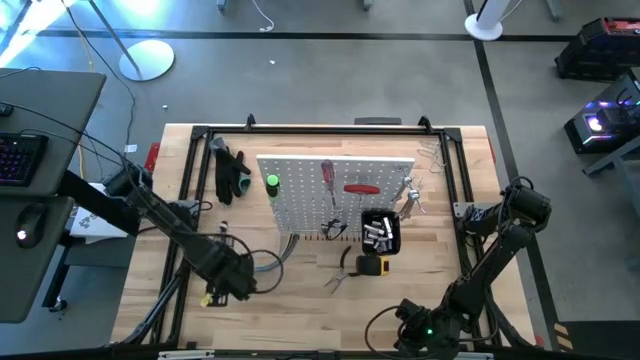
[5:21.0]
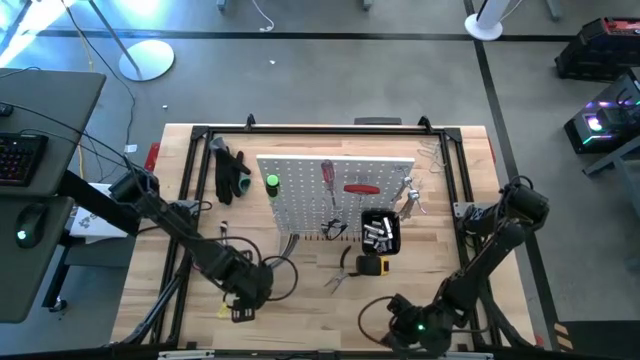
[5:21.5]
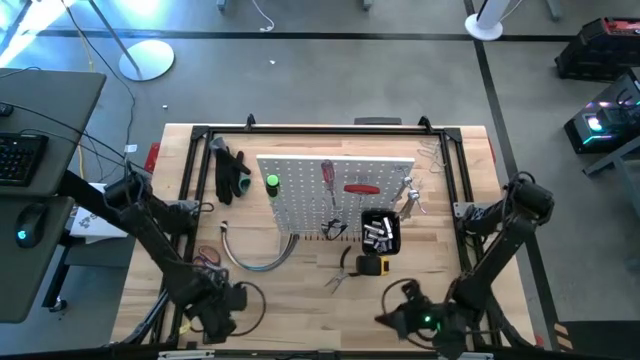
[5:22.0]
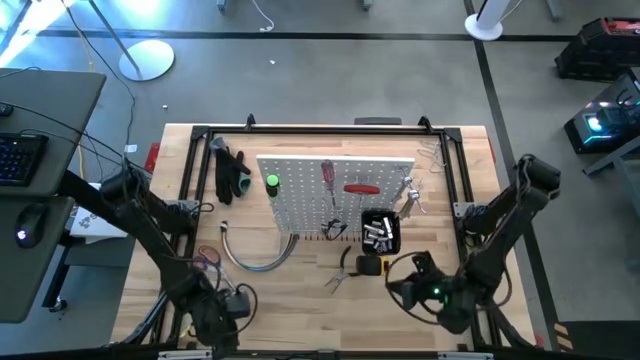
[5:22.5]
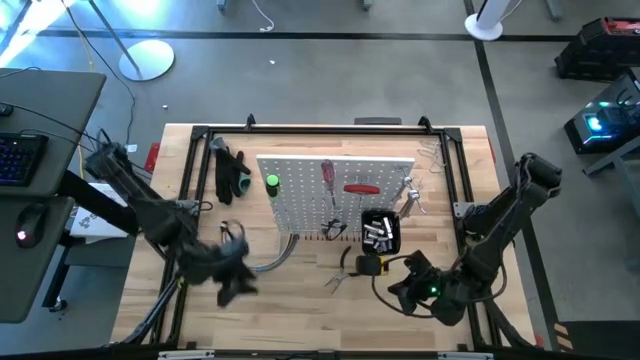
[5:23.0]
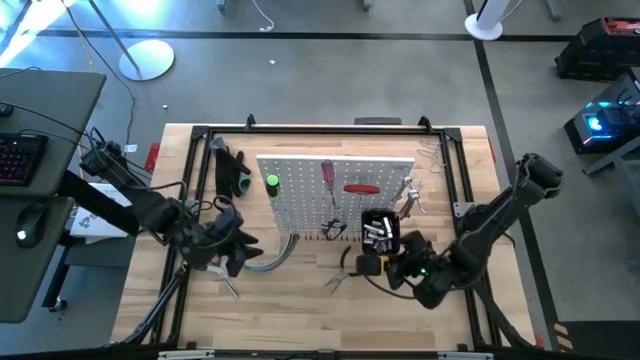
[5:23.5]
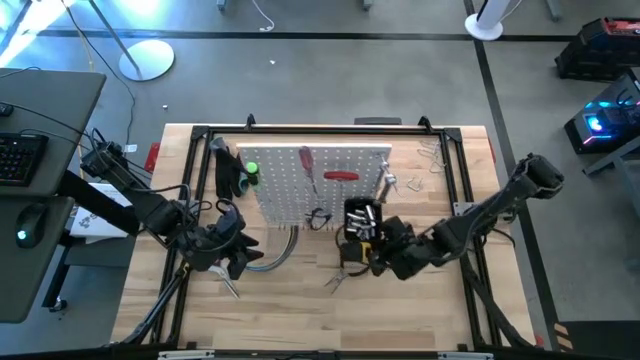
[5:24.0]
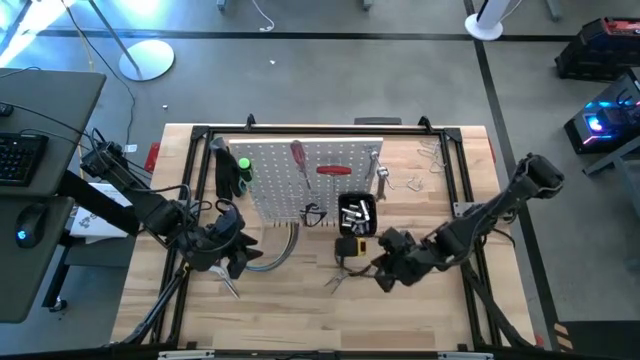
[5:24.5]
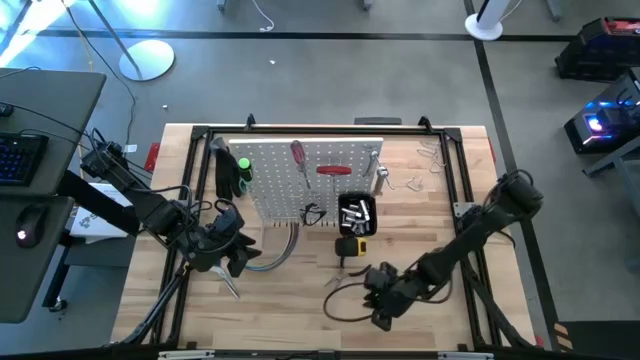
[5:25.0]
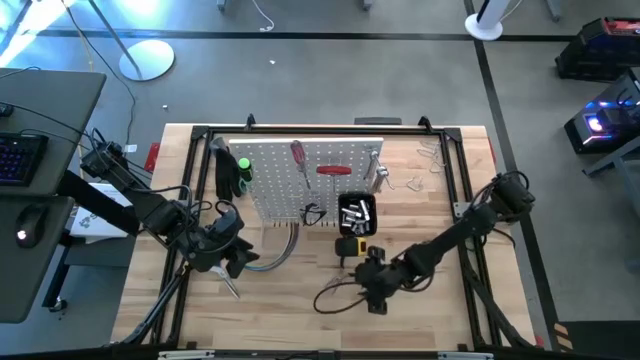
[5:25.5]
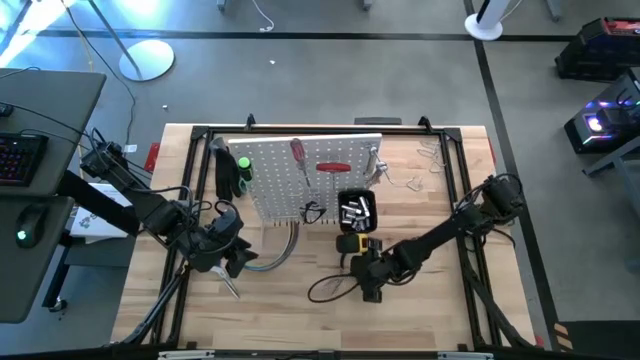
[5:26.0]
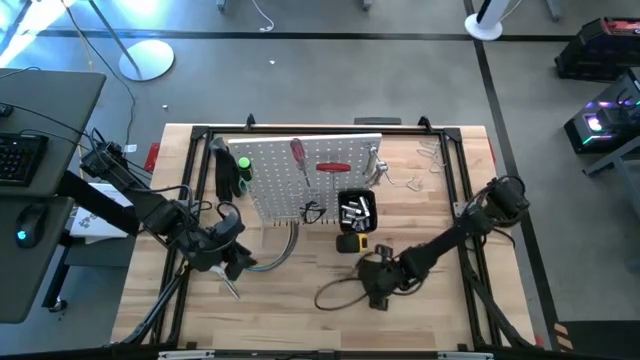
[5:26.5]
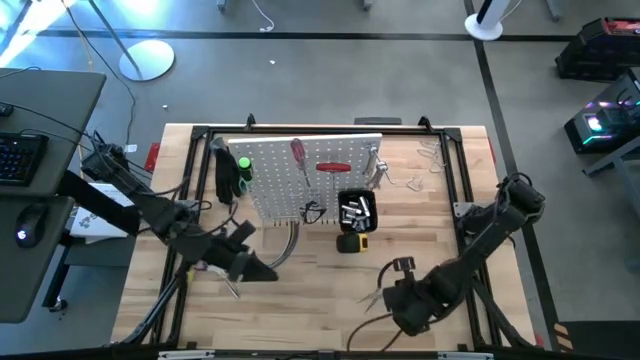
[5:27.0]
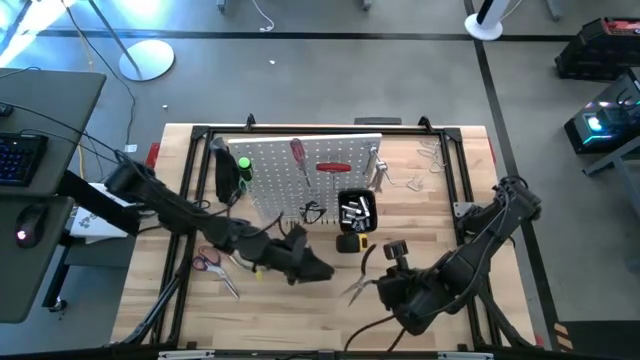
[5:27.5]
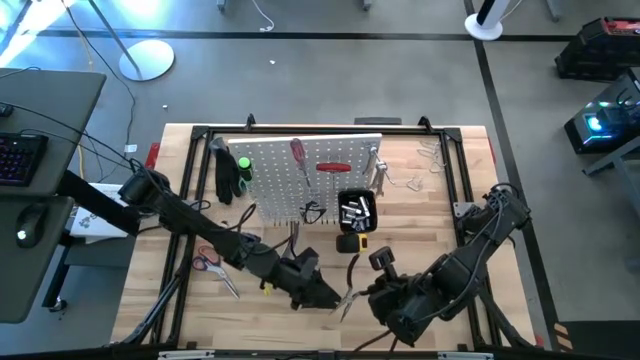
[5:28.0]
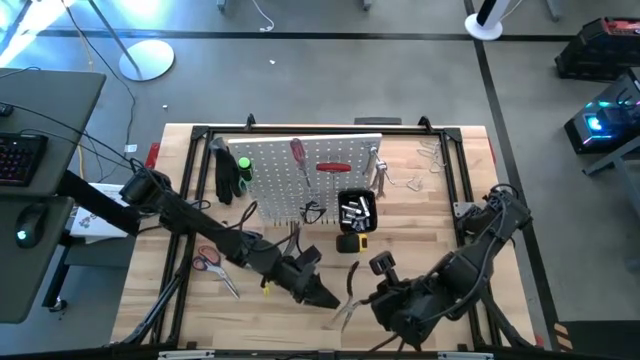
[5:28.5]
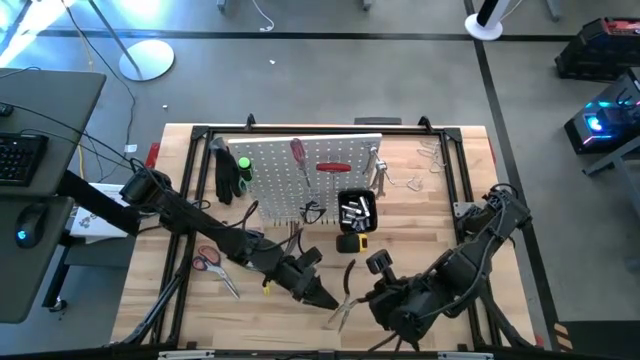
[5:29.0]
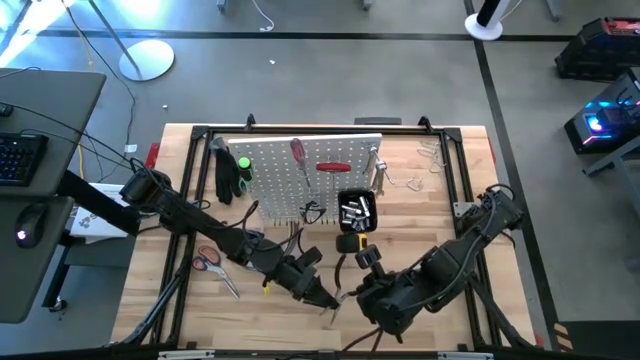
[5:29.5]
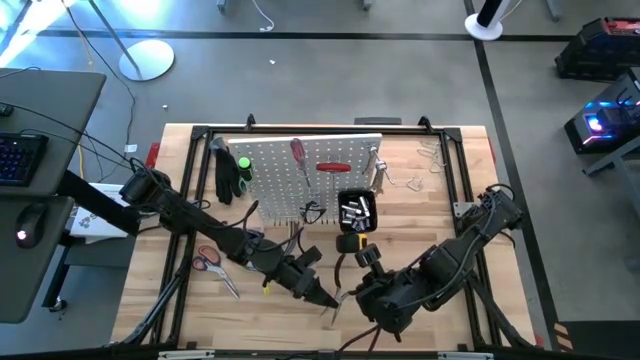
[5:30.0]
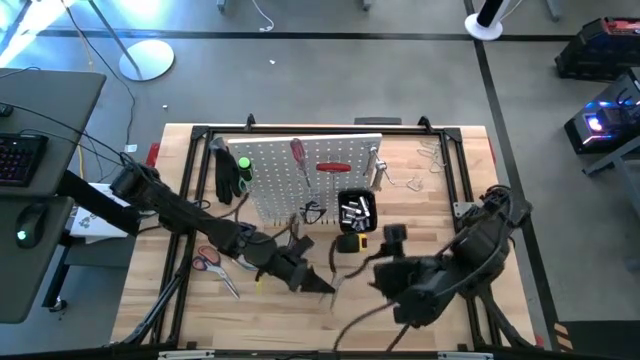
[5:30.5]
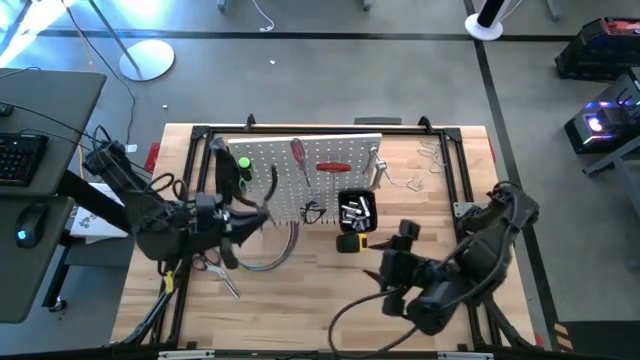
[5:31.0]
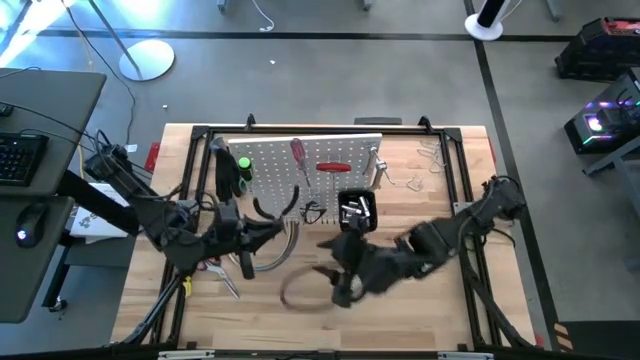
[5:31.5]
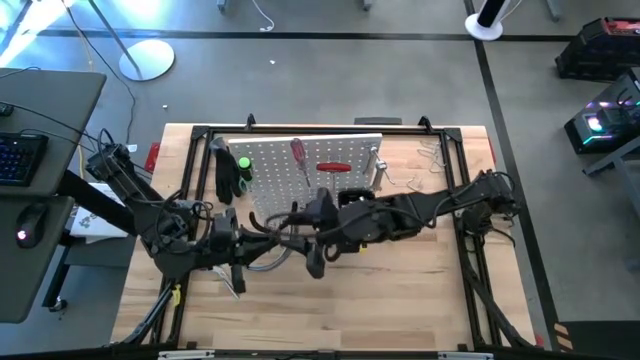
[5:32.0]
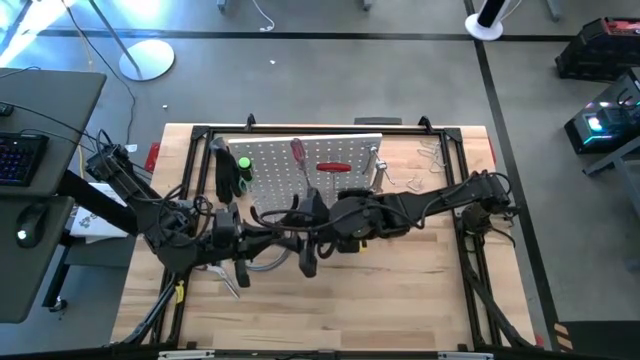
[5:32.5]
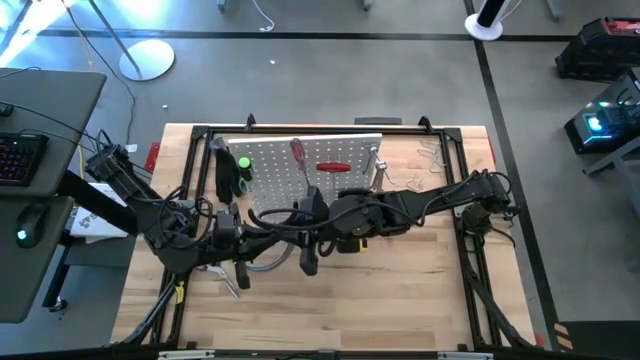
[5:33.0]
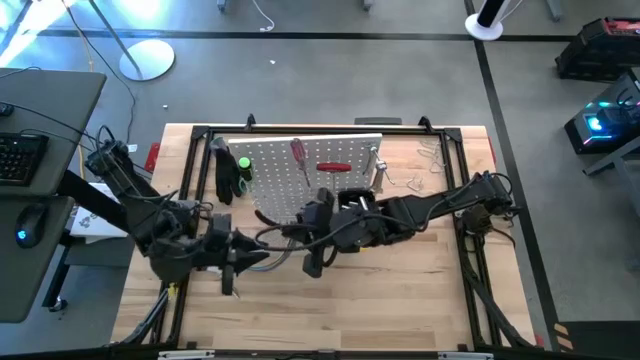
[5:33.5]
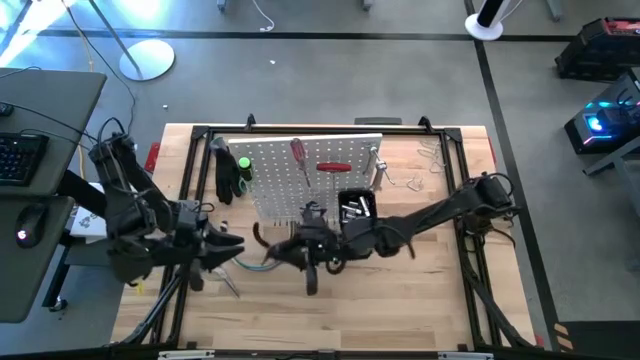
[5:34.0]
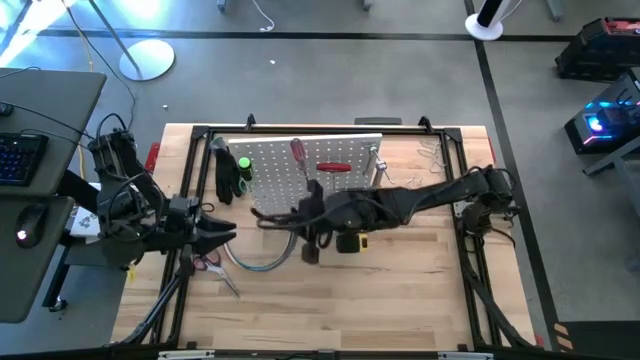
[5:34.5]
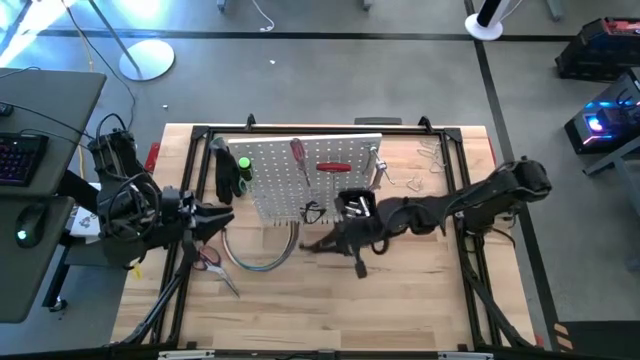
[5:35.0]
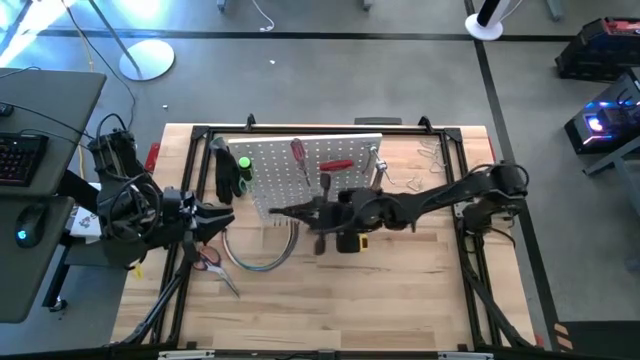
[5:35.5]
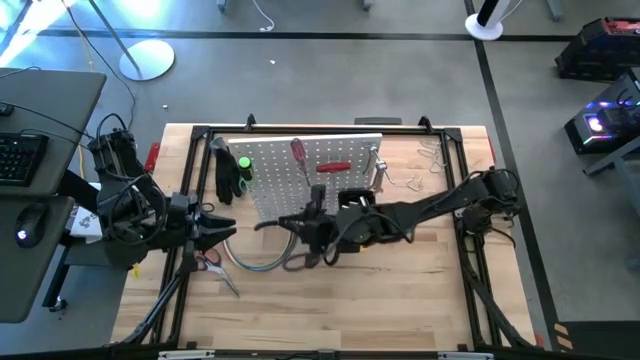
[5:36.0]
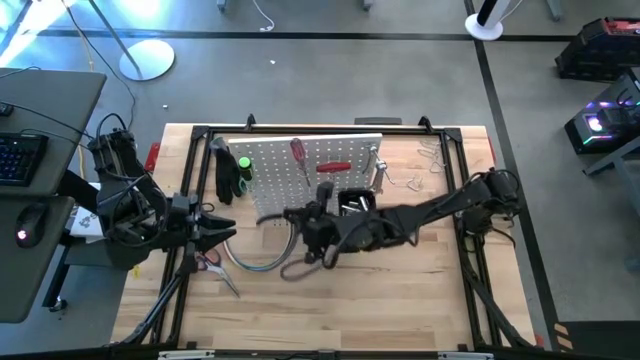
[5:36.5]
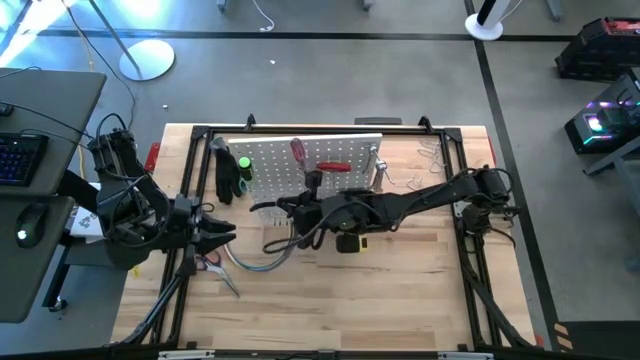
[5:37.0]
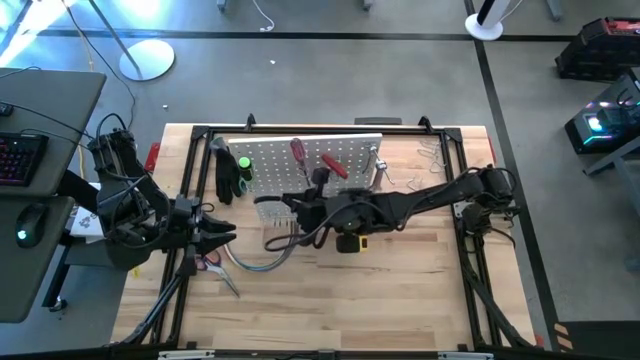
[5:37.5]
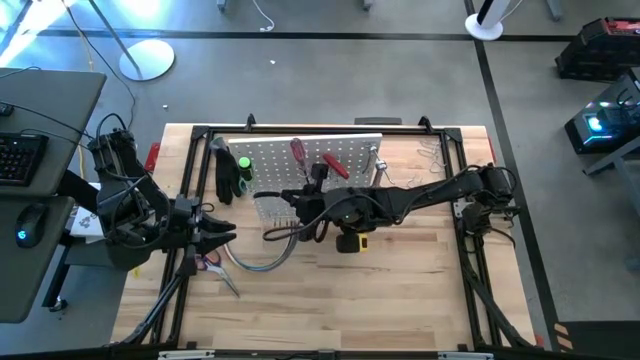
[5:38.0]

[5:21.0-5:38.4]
Task: Hang tools onto peg board
Hang the plier on the peg board

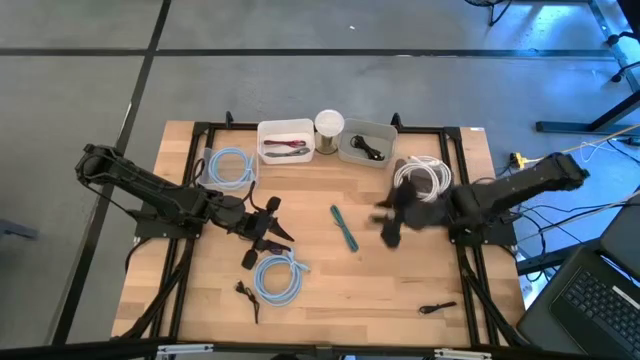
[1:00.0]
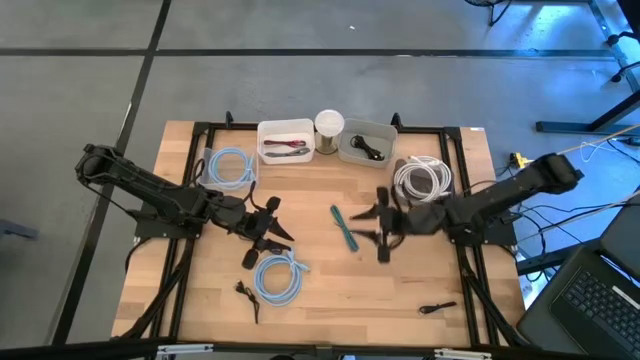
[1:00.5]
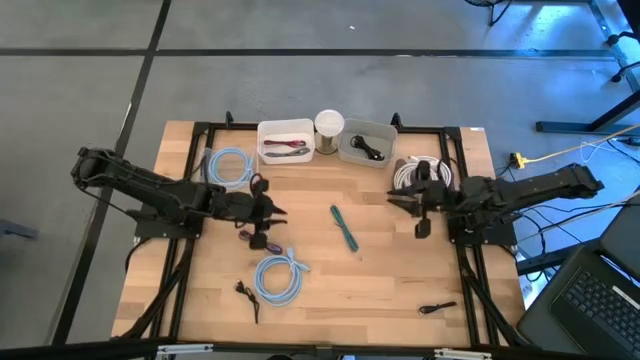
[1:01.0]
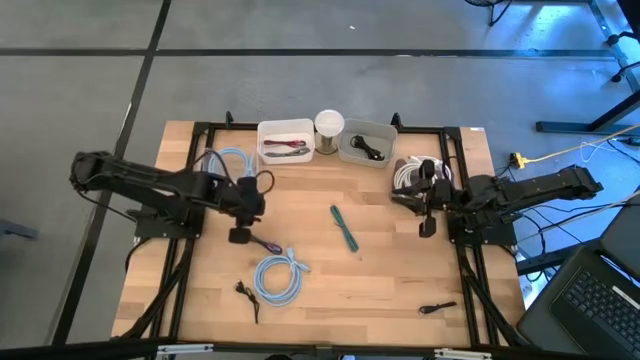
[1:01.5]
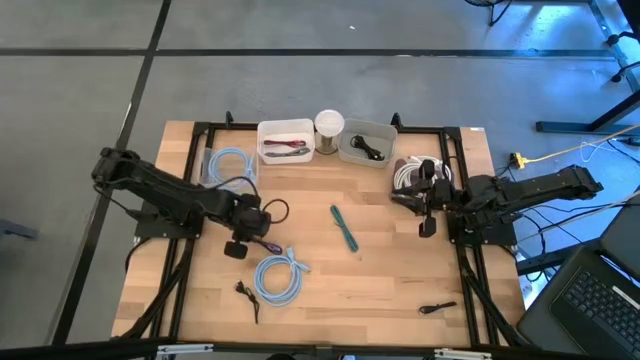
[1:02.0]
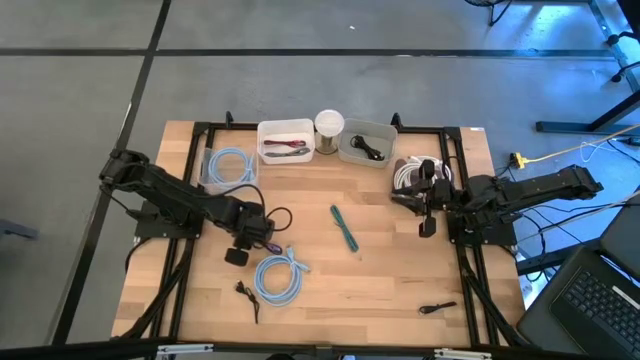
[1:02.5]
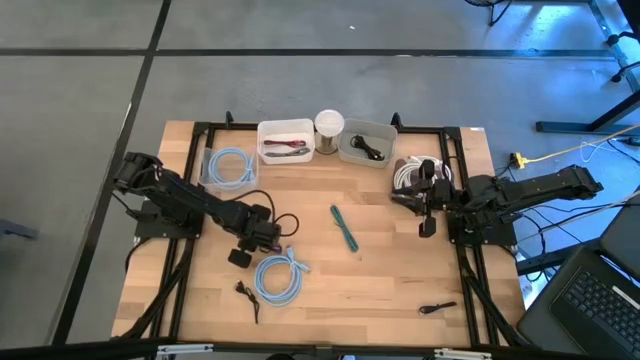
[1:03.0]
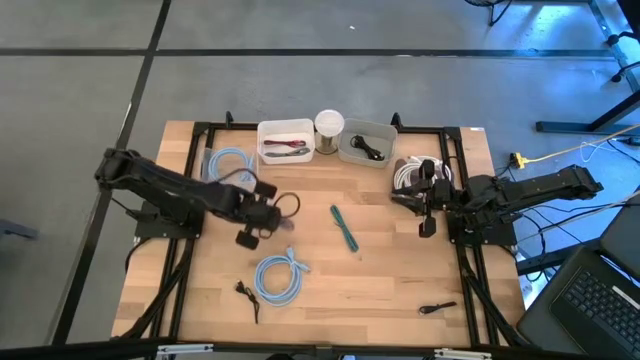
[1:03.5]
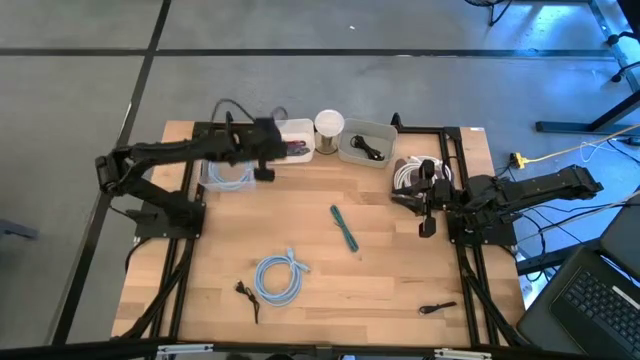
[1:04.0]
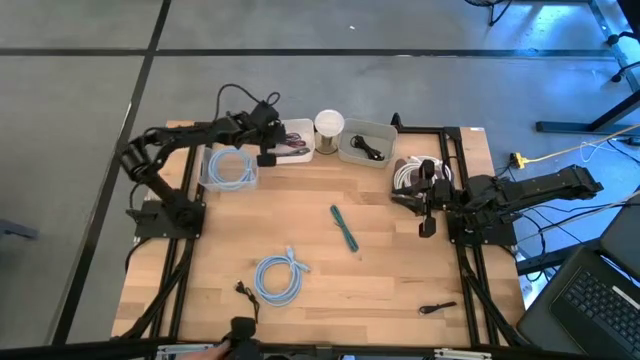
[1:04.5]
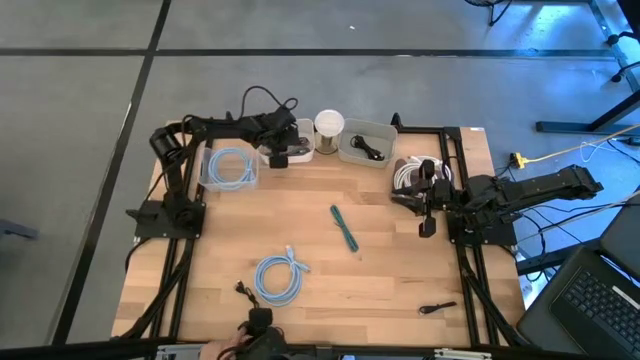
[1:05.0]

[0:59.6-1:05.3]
Task: Pick & Place USB Port
Put the black and violet USB cable into the white bin
